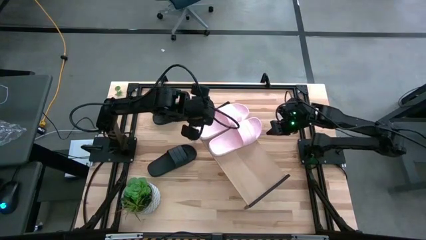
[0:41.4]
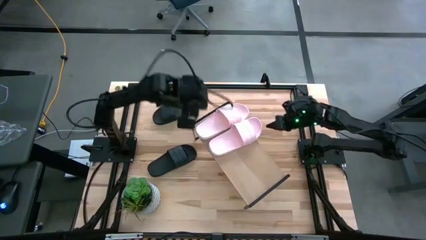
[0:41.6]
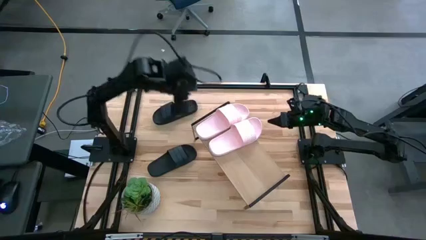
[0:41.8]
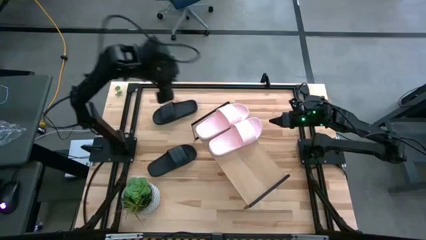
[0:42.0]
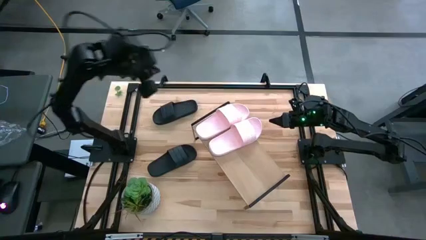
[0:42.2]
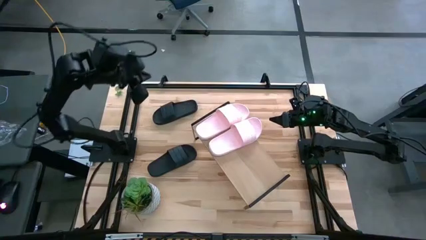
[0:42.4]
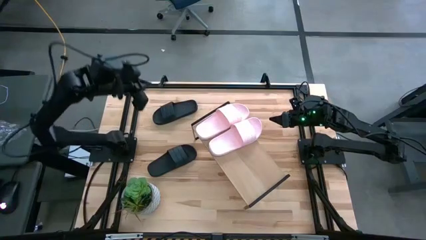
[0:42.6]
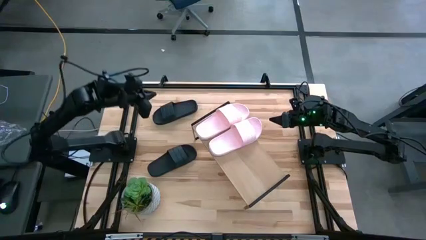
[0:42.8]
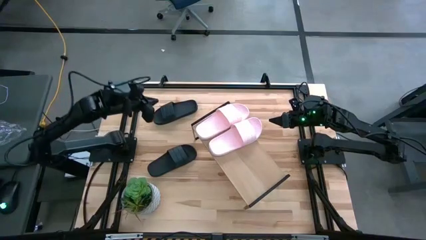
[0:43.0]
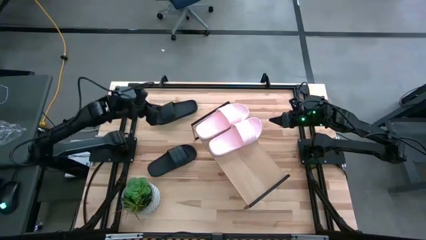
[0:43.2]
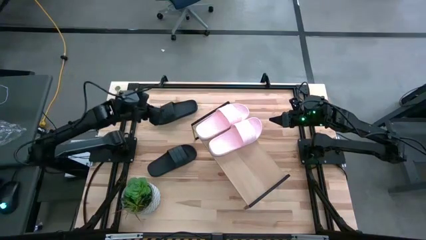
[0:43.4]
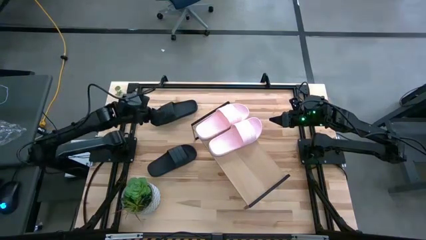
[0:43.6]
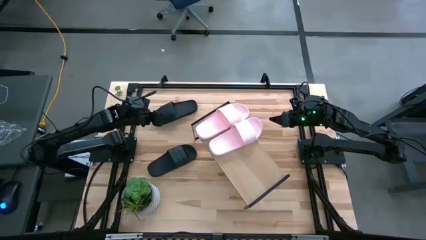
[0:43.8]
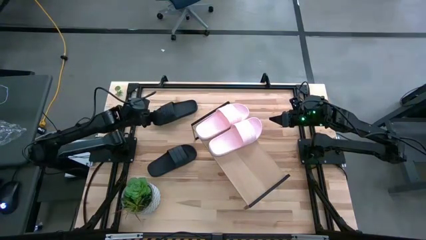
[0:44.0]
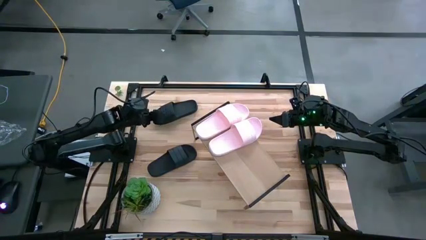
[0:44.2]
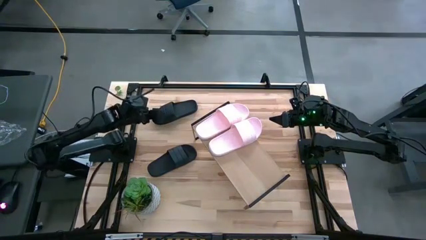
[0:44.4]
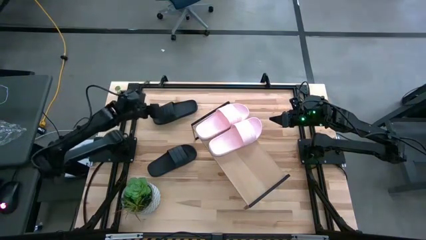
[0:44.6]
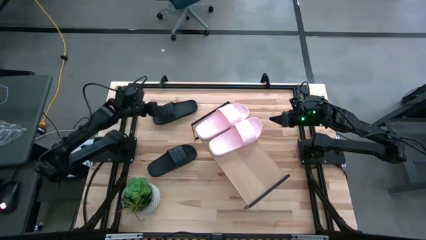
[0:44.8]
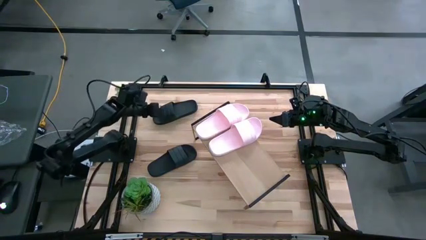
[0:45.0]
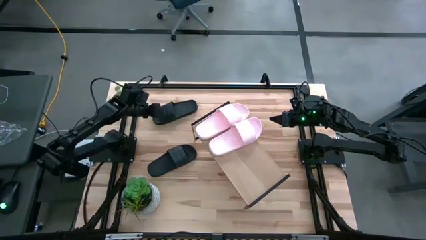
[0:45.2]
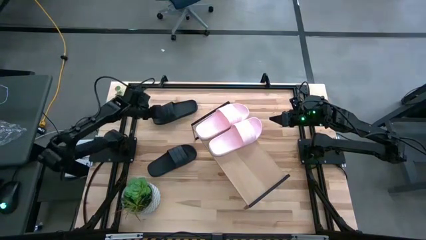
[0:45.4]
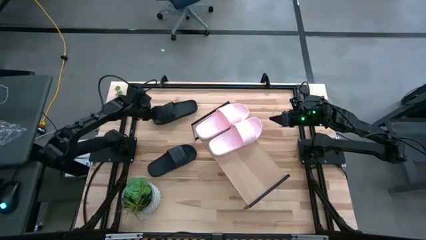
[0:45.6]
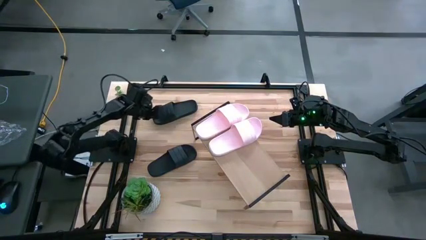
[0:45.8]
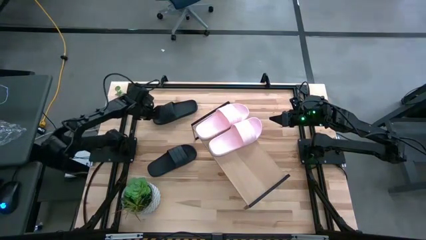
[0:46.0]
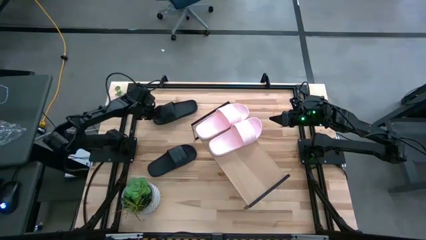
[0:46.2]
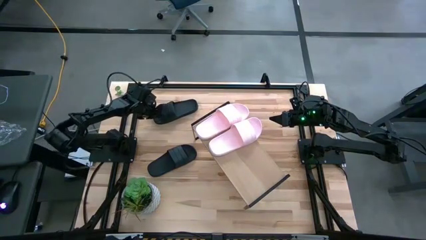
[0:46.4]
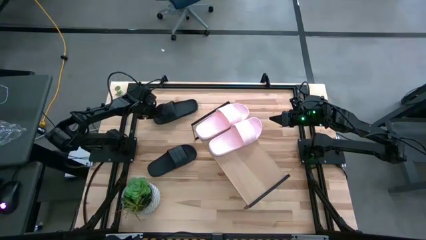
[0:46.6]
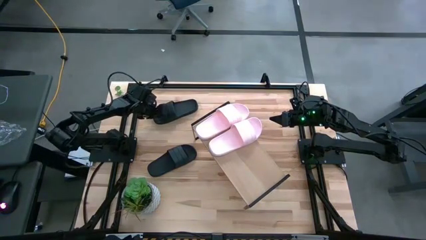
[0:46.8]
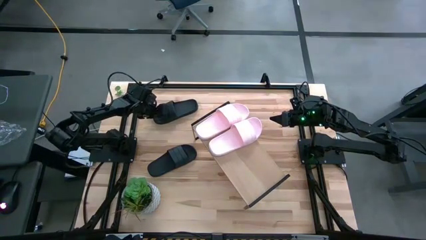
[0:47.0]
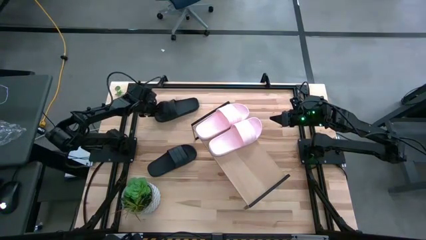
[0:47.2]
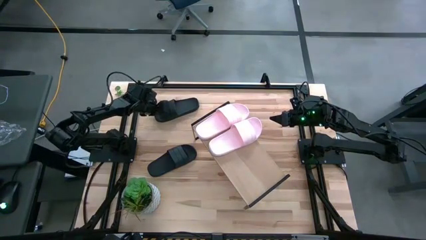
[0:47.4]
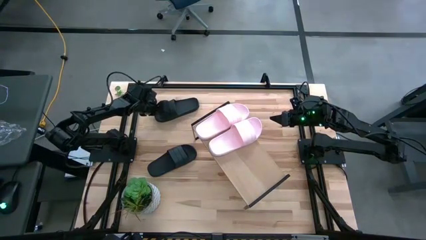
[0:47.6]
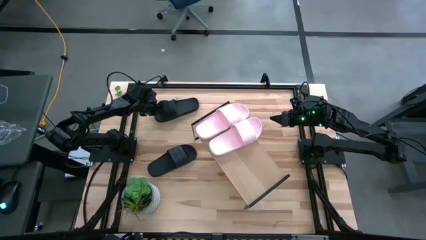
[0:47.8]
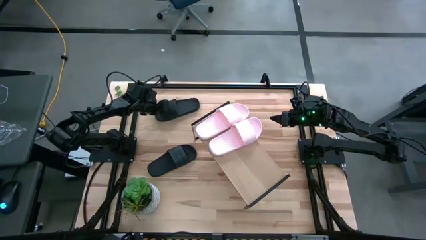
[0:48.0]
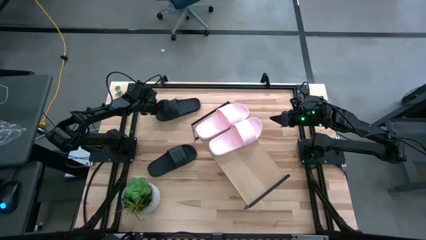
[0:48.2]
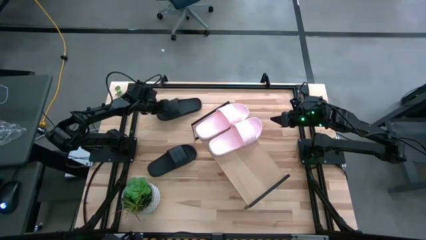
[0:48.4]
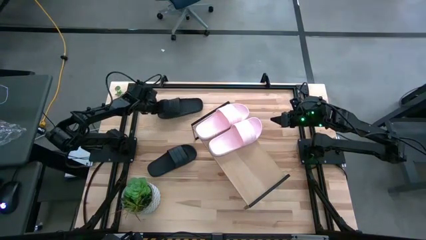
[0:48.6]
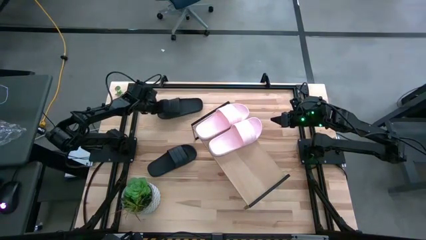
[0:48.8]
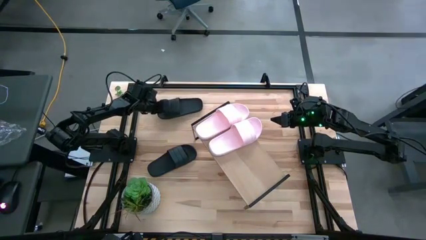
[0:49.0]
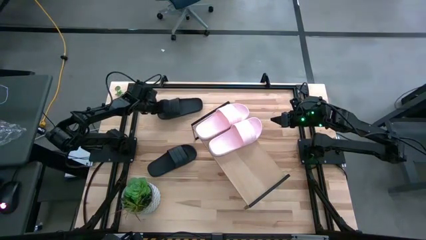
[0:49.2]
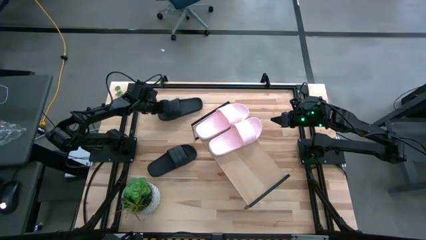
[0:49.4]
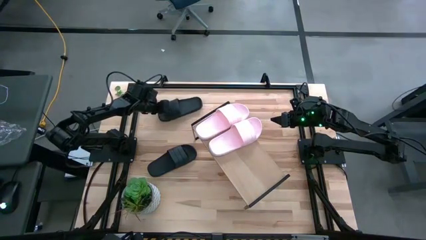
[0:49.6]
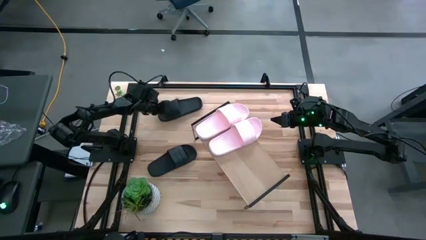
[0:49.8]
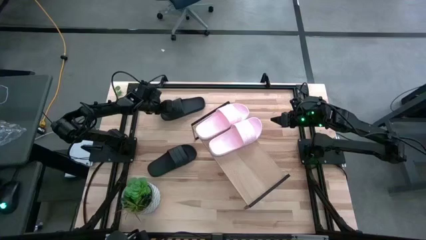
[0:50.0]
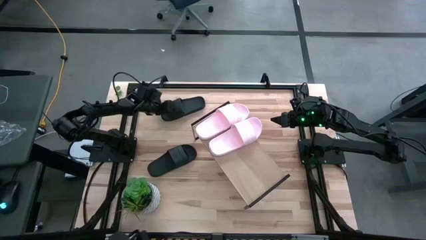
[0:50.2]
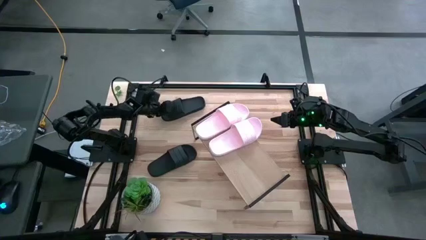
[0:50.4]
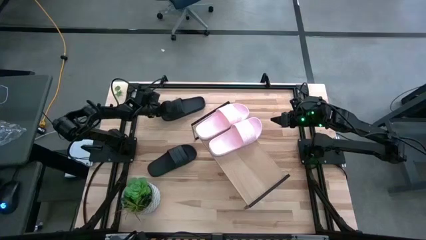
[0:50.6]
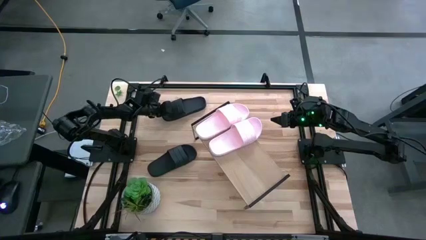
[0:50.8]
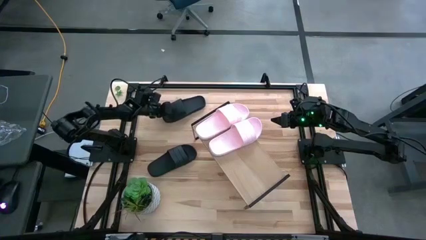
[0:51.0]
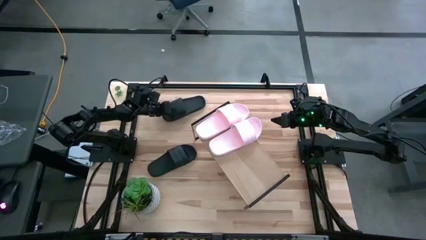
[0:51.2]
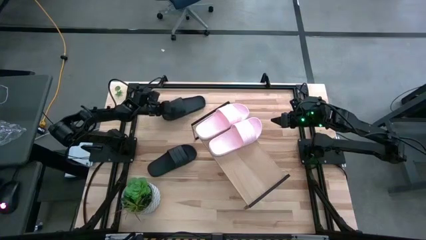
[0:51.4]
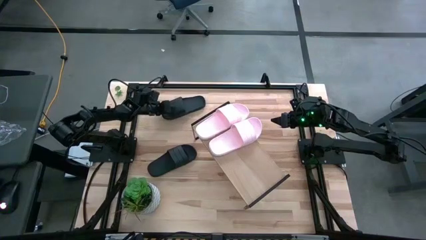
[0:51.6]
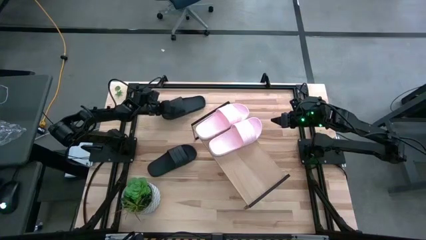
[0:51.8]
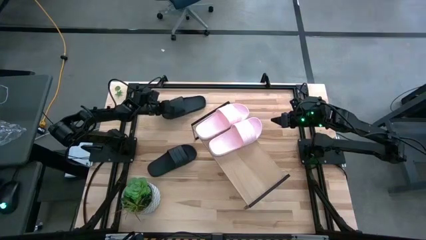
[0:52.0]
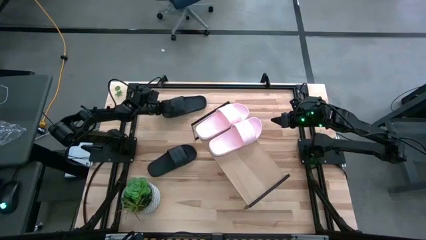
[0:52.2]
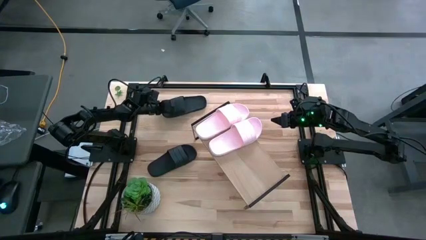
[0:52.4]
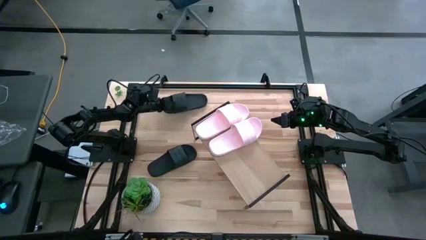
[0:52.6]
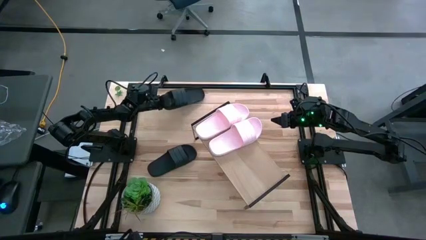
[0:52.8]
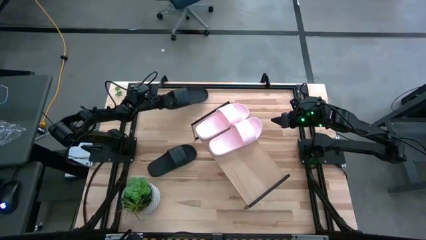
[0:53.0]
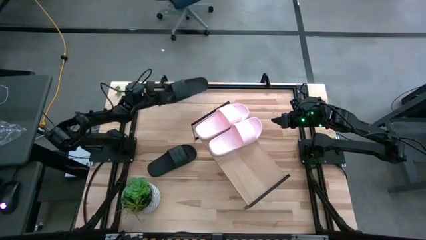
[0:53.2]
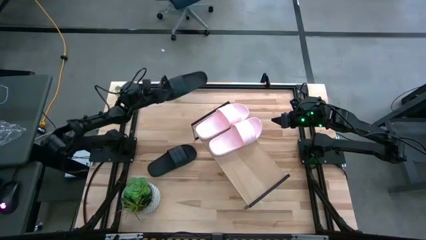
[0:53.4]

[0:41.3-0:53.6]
Task: Pick and place slides into the shelf
Put the top black slide on the shelf

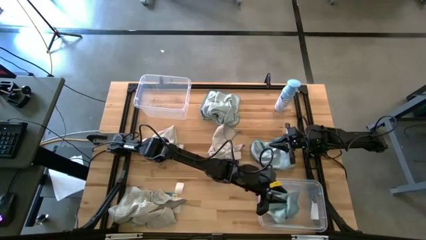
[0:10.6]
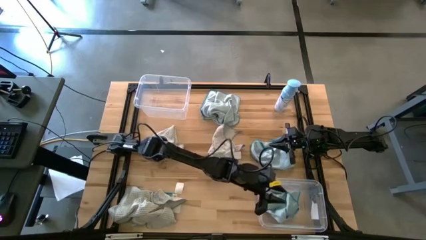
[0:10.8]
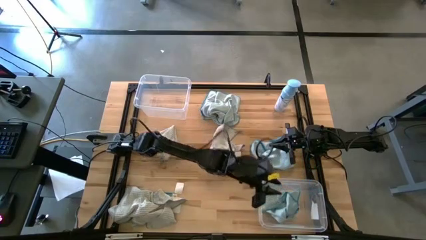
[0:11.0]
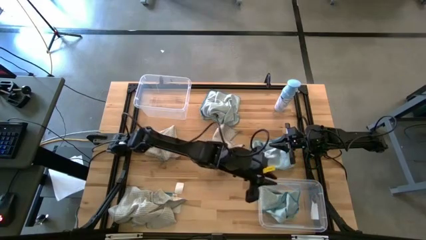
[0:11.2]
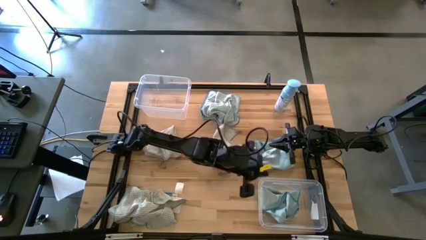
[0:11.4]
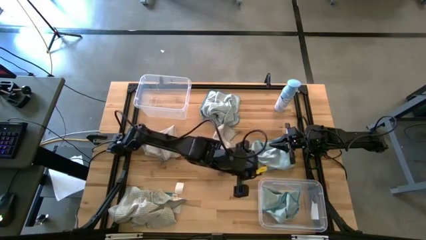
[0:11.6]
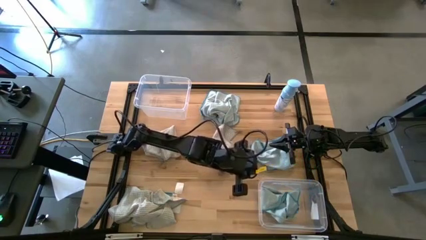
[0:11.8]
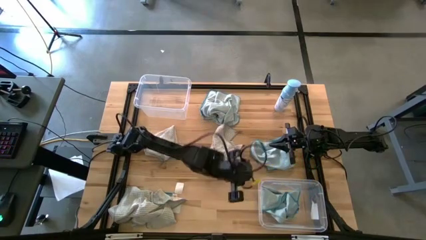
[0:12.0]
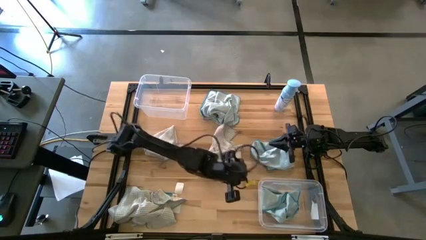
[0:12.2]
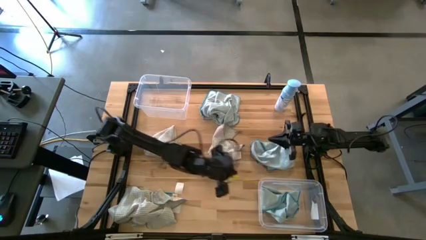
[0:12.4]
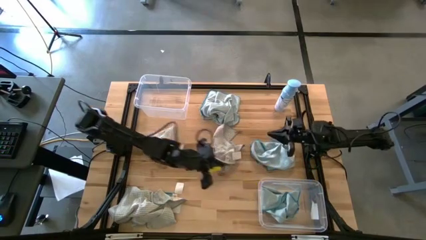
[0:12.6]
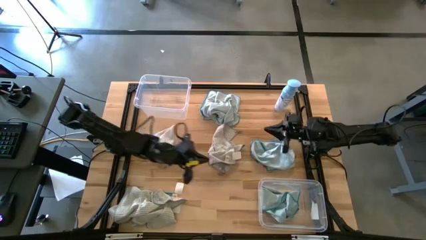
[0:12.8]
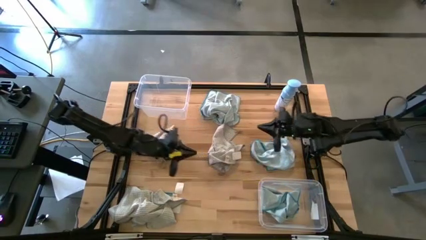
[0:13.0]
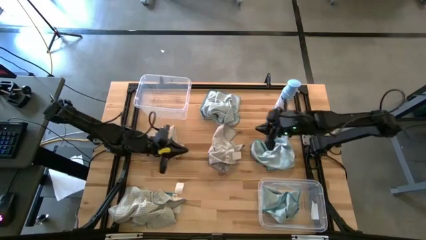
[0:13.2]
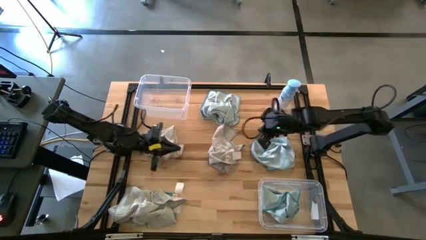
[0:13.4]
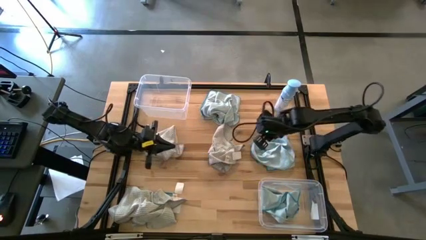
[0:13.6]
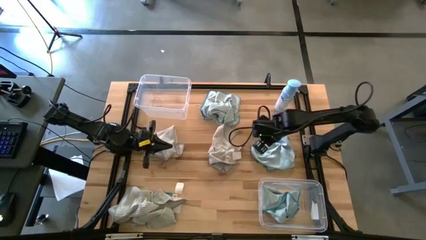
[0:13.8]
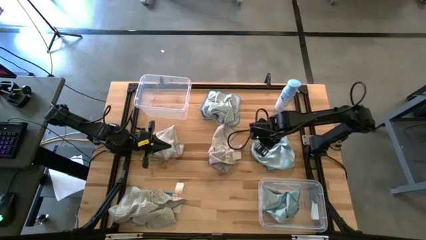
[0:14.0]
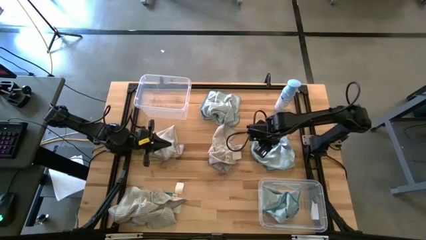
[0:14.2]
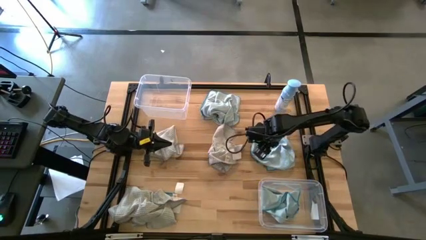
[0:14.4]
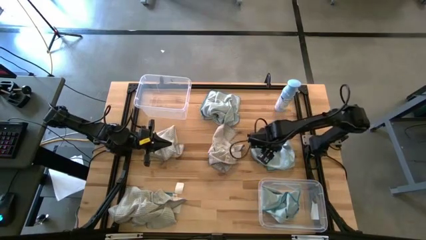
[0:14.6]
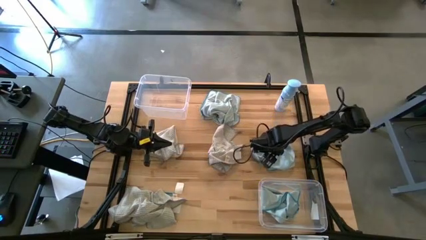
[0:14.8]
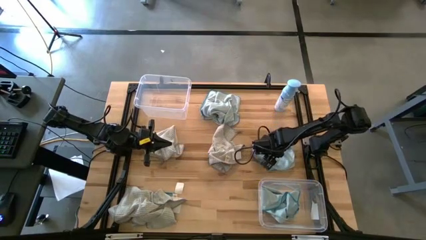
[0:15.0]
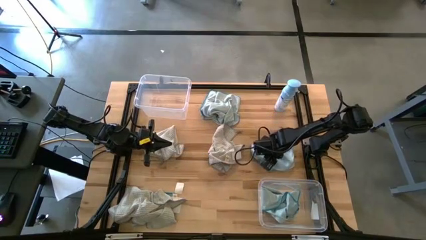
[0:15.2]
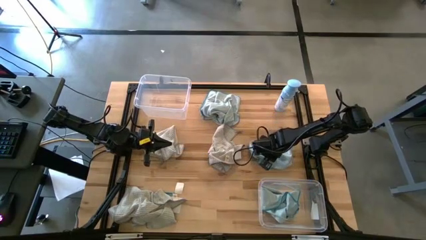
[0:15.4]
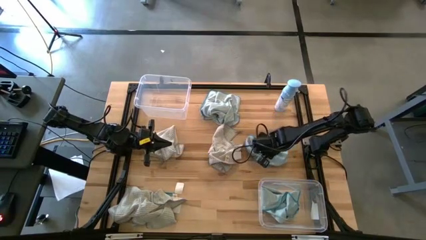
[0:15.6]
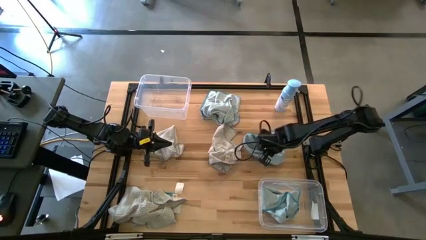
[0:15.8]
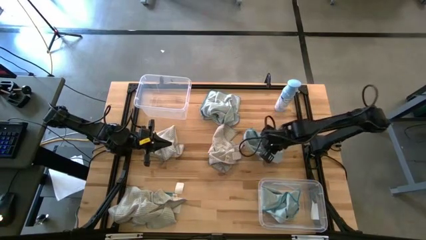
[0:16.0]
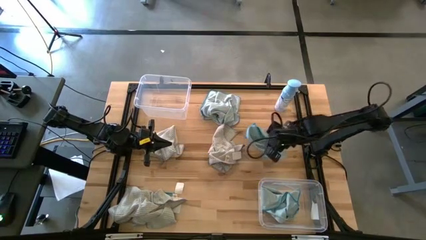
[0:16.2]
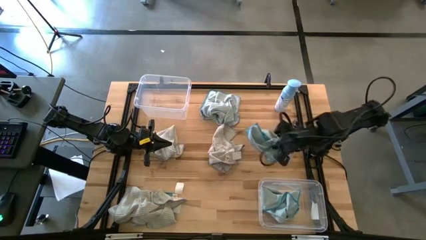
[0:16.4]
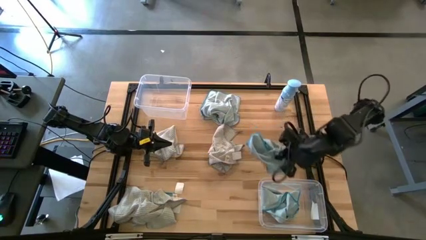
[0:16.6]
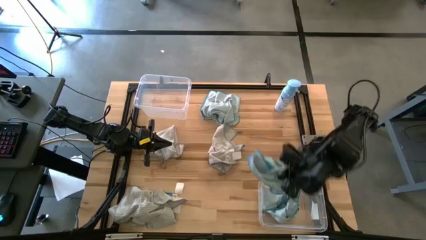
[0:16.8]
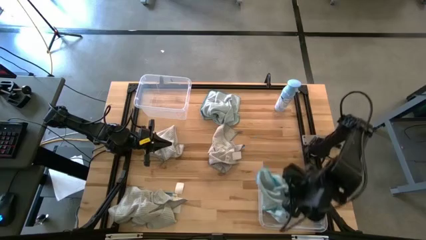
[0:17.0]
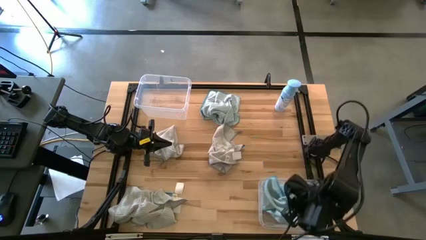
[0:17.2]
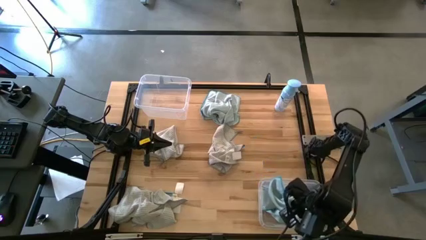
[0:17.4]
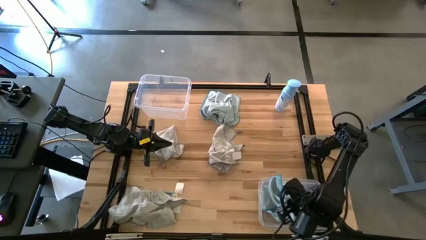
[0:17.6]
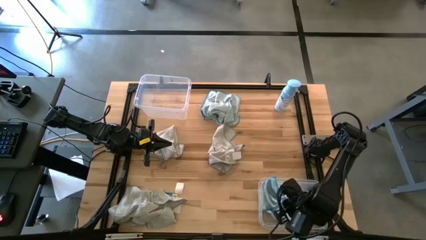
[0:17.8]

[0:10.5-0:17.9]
Task: Sort microfiber towel by color & place in baskets
Put the middle right blue microfiber towel into the bottom transparent bin
